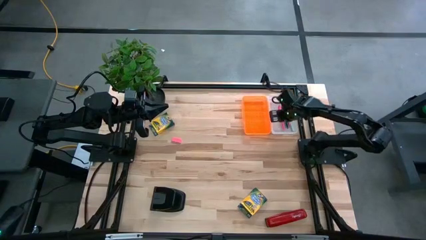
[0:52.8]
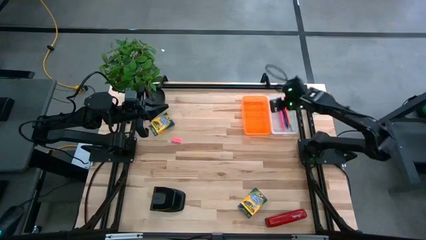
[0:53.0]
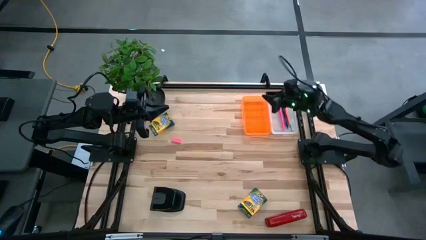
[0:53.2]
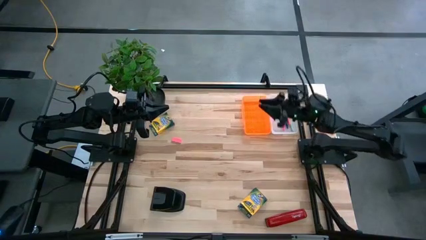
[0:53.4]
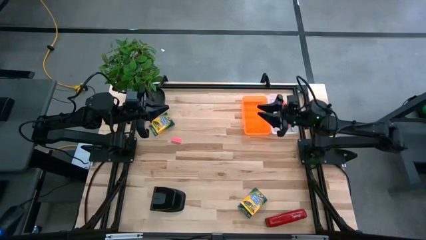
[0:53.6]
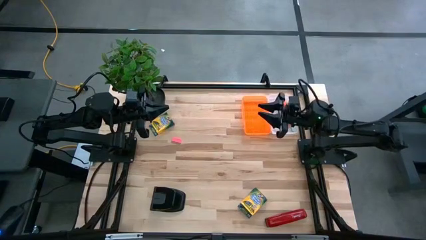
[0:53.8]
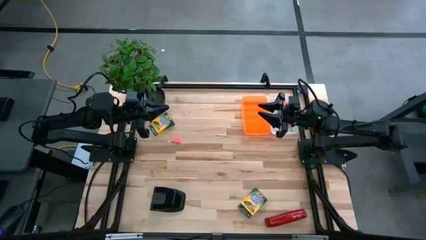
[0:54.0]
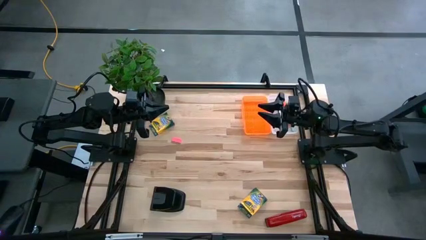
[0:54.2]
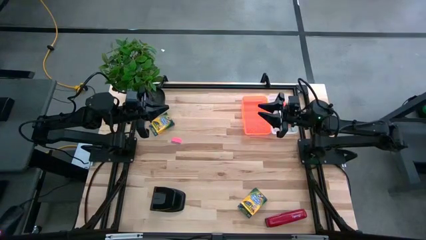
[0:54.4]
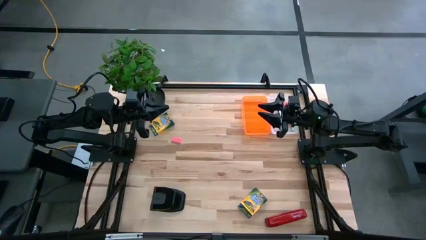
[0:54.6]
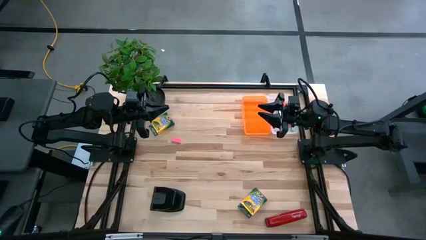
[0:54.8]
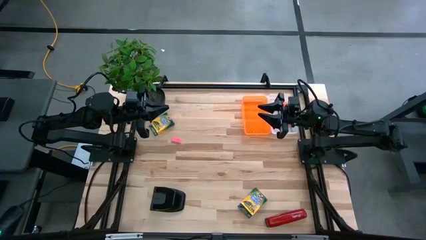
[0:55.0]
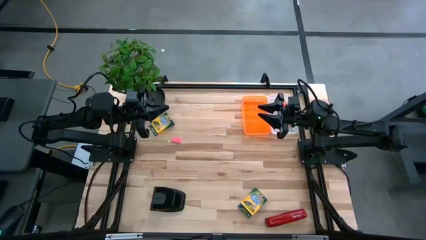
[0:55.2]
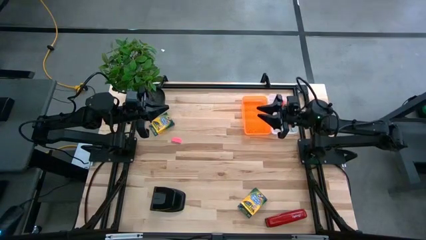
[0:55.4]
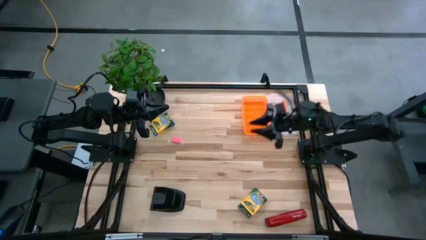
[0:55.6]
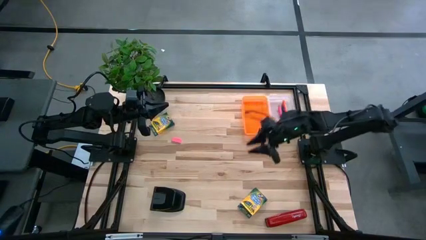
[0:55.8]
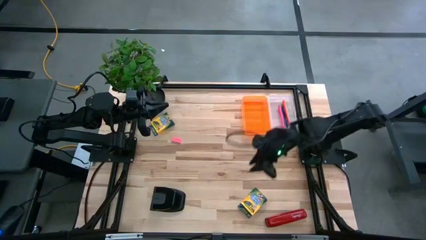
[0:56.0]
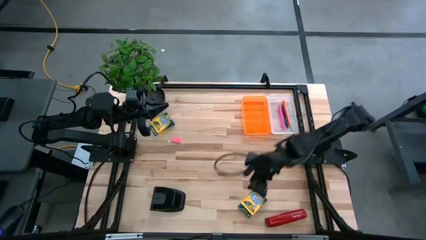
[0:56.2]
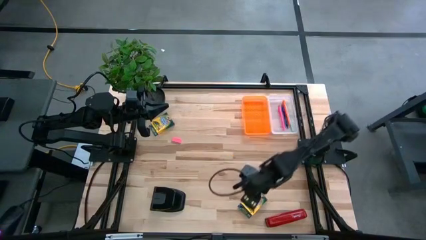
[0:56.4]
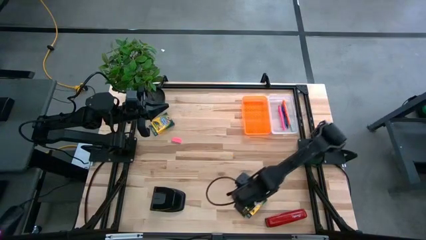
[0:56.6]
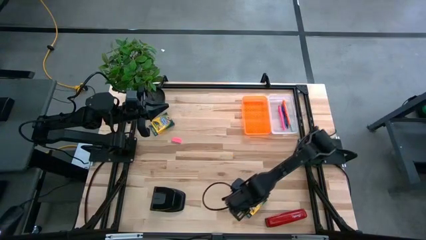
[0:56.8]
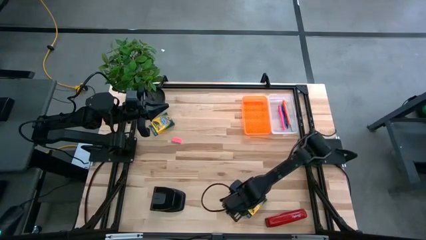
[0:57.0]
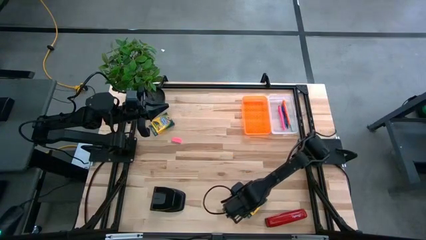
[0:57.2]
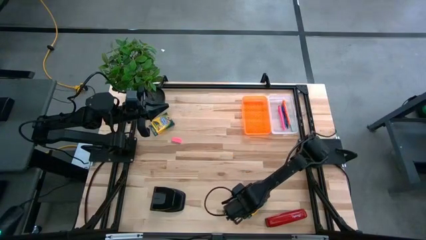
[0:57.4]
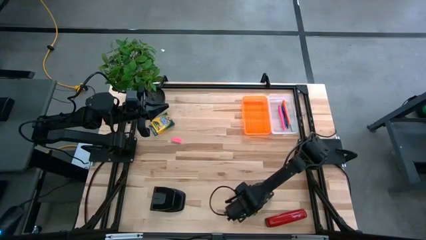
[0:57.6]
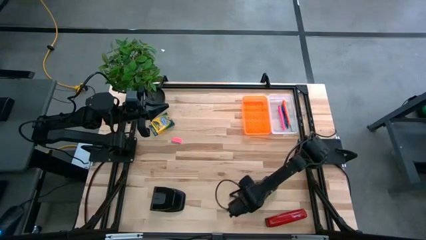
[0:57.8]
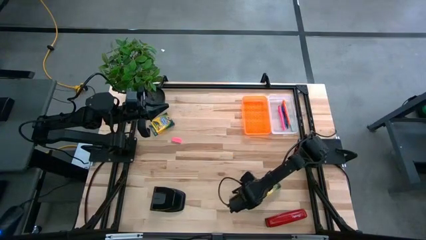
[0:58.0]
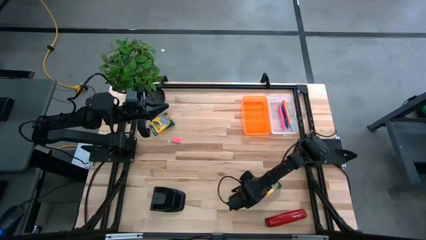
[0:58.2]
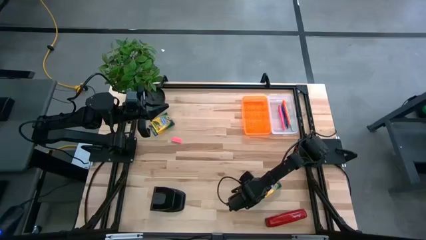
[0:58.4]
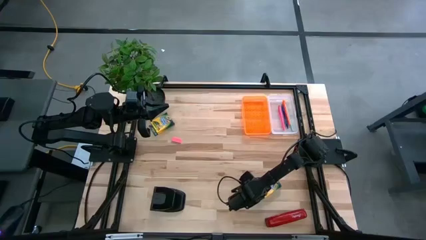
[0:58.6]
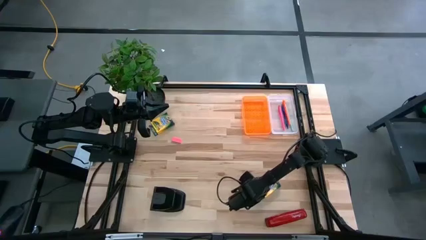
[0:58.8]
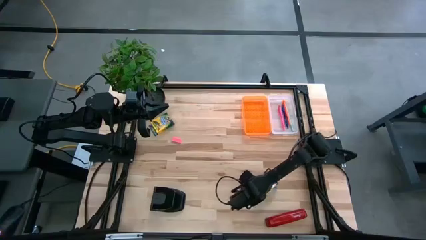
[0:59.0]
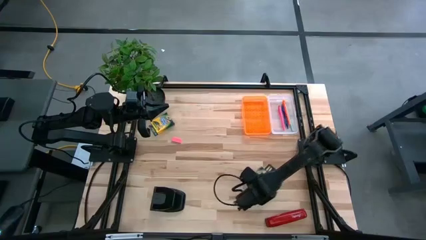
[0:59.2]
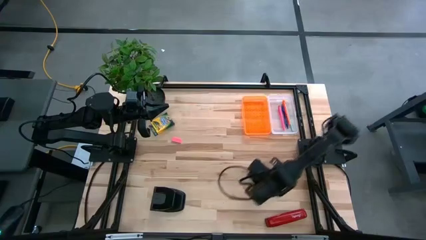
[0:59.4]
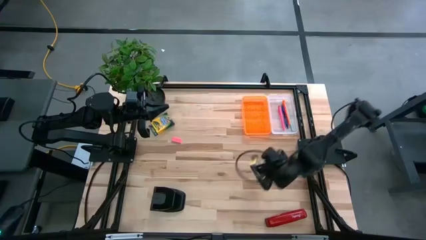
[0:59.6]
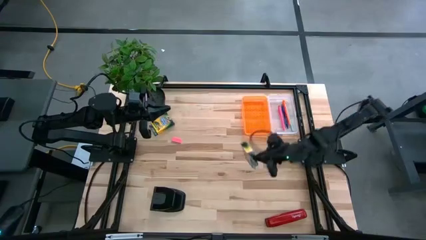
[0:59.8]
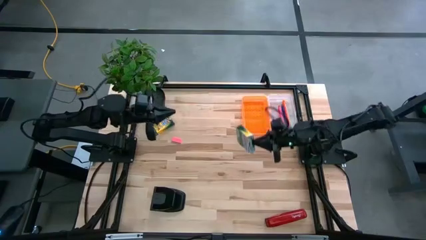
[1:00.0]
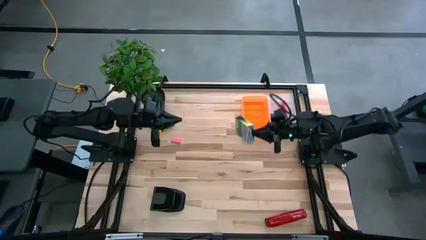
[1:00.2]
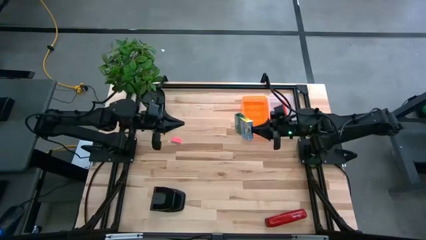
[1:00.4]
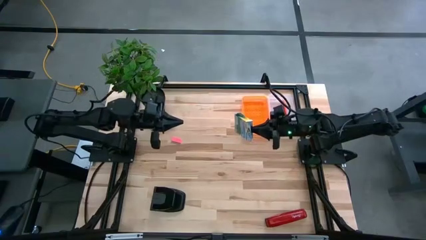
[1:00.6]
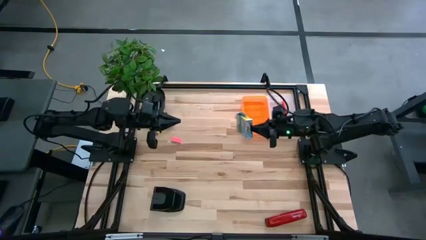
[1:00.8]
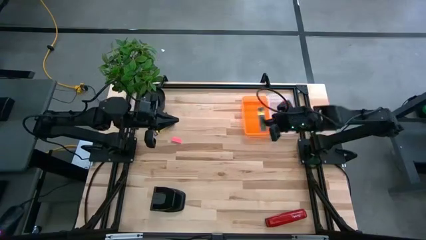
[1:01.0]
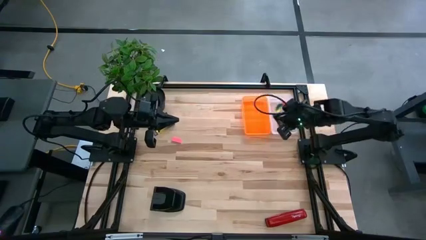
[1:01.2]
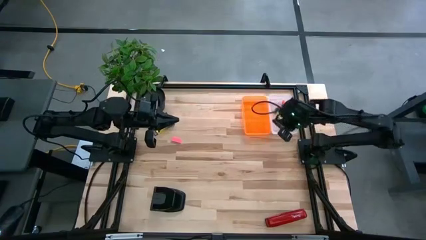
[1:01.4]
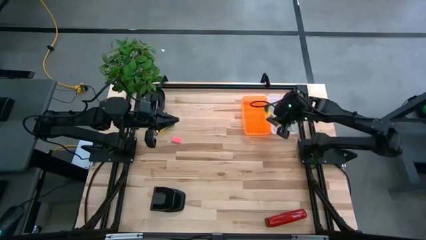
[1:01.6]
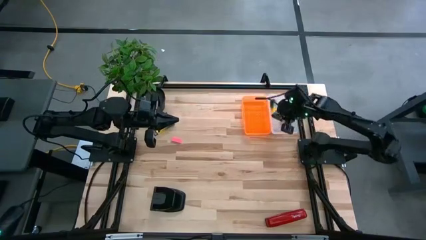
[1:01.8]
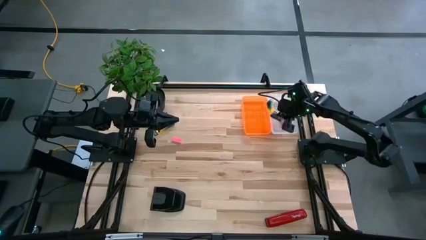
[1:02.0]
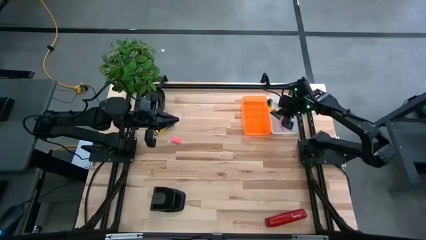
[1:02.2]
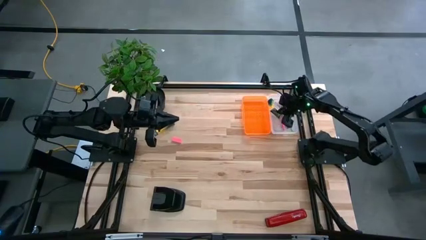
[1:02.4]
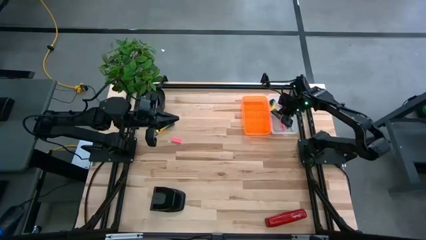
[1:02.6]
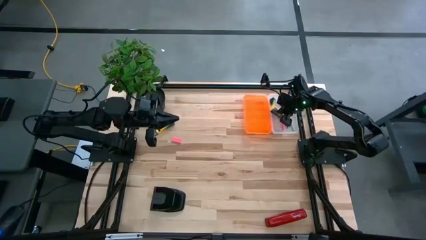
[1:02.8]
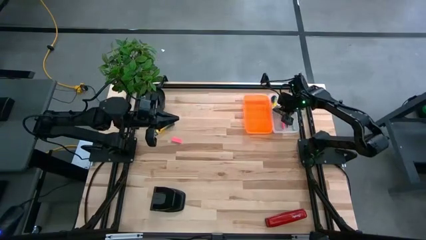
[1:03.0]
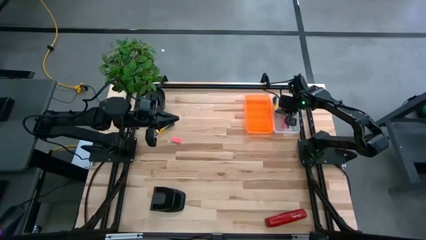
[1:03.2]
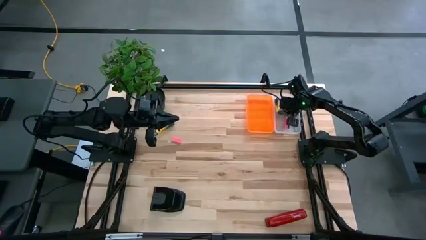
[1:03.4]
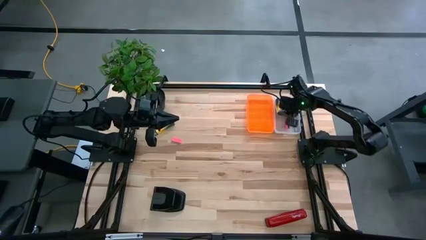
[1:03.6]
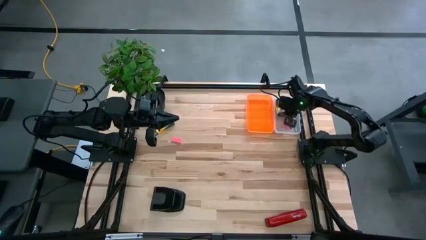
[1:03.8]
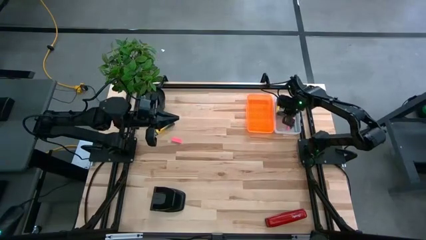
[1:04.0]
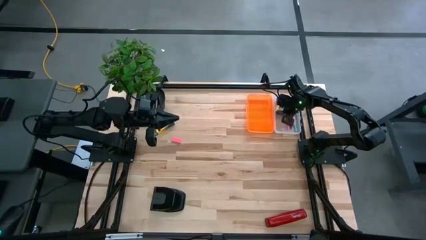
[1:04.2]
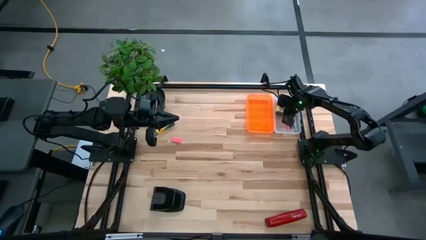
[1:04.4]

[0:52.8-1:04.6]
Task: Pack school essentials
Put the bottom yellow crayon box into the orange supply box

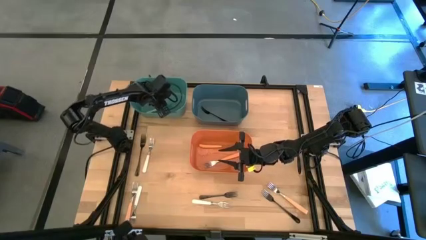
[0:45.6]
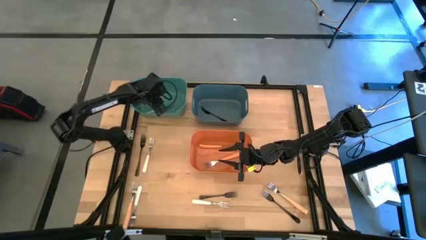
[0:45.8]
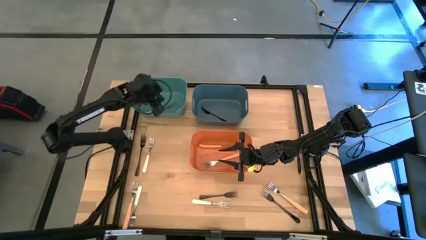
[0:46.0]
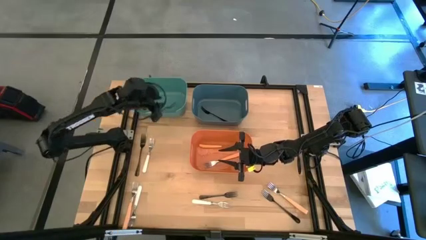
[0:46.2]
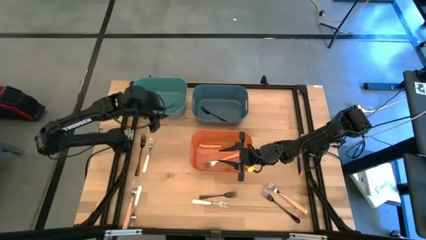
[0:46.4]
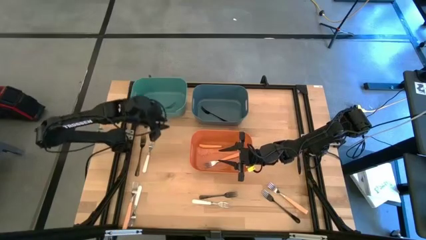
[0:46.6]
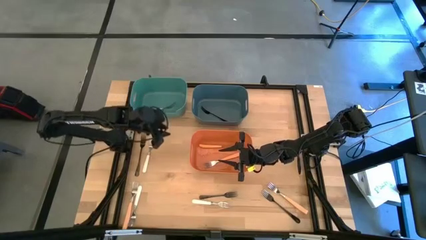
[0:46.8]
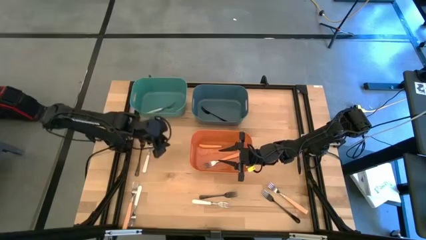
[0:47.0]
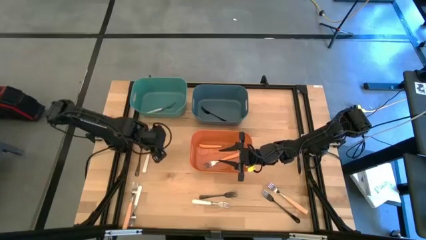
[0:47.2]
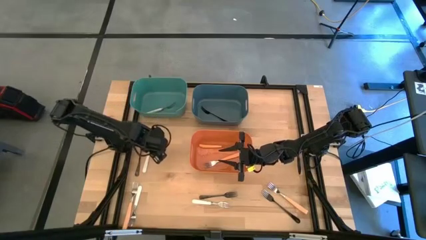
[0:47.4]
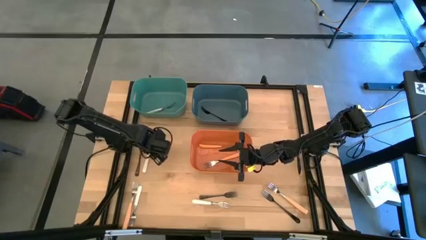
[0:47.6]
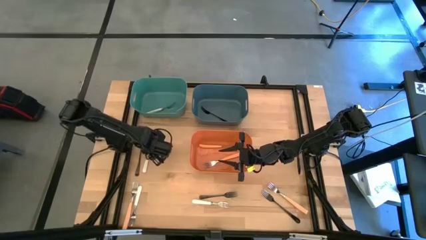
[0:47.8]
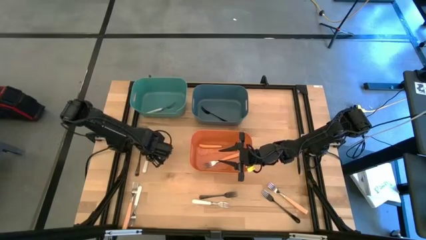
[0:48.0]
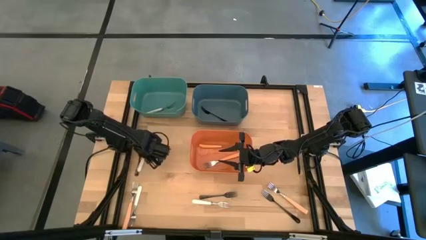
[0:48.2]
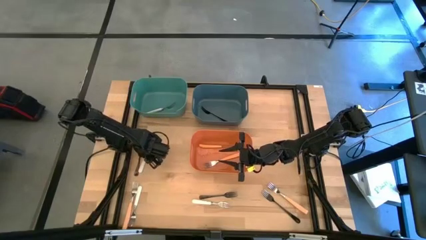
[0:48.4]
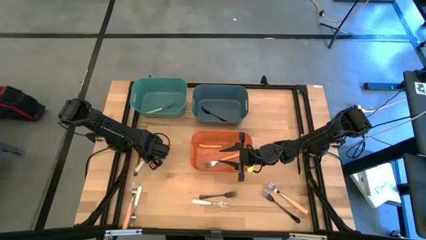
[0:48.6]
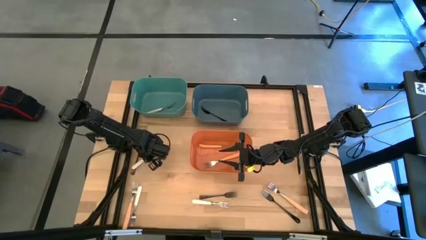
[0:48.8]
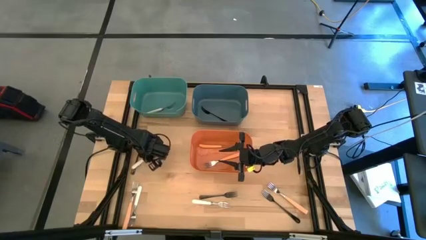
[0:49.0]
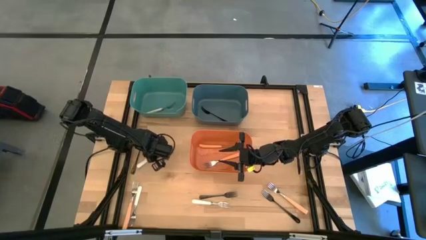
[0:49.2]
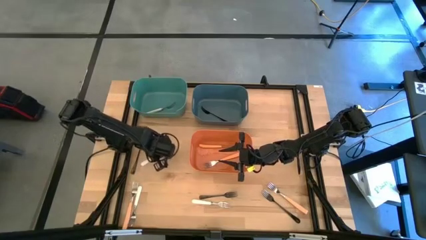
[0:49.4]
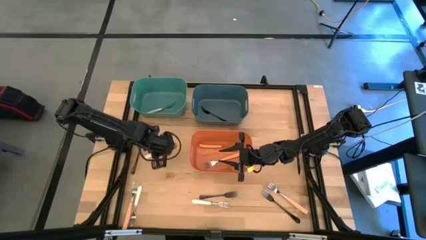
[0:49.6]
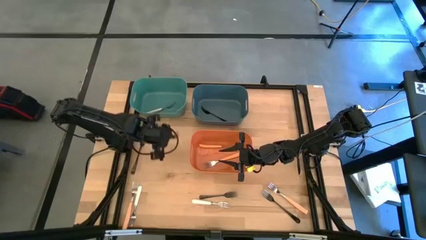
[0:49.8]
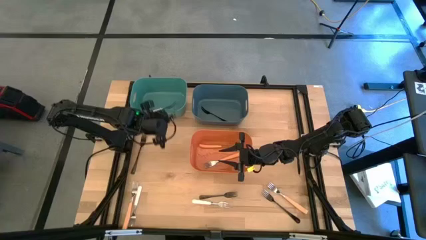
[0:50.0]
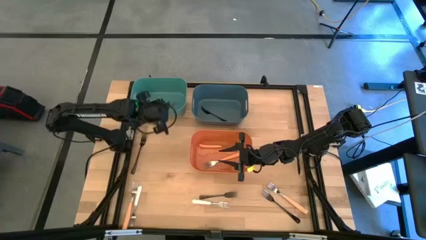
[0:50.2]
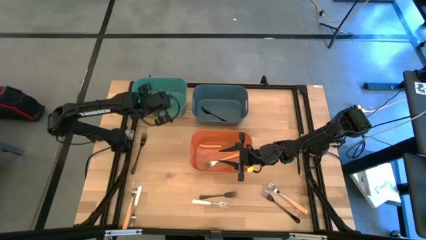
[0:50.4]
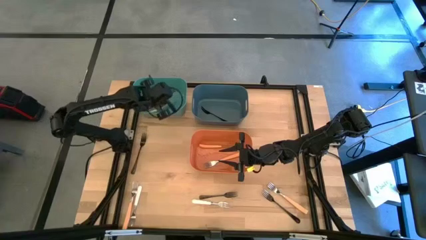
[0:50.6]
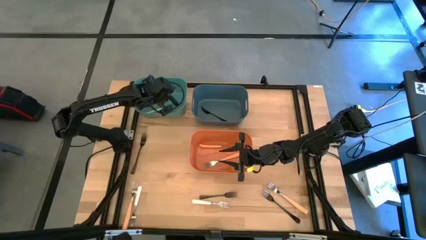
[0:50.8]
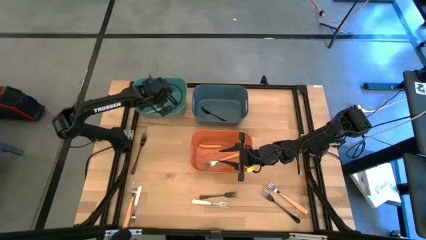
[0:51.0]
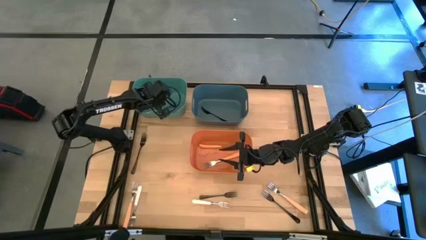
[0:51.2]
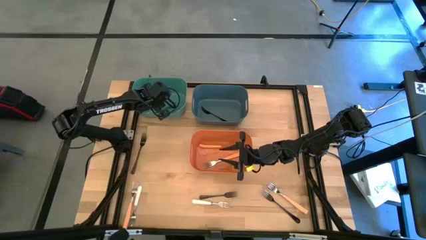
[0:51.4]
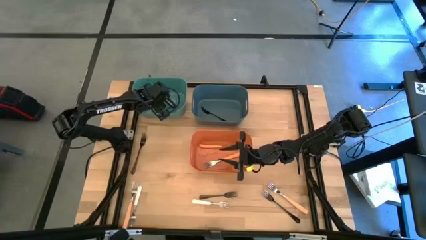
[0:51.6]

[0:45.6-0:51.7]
Task: Sort silverware by color (type)
Put the white fork into the green bin
